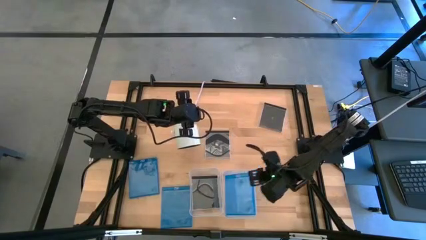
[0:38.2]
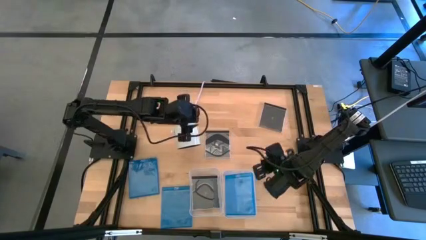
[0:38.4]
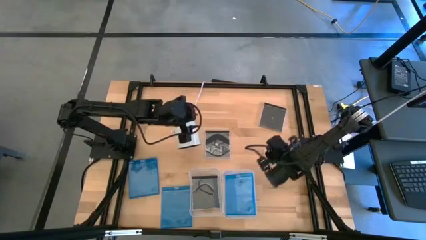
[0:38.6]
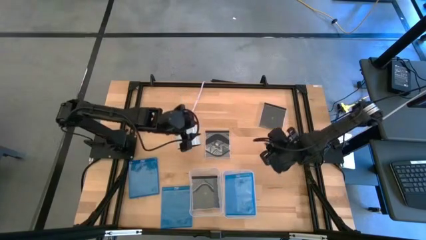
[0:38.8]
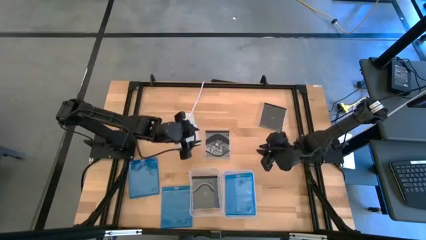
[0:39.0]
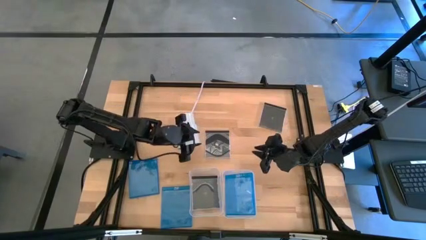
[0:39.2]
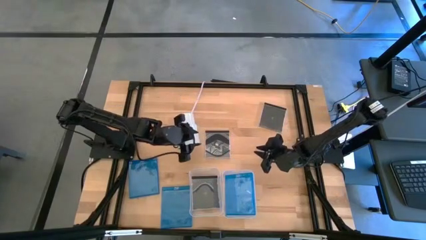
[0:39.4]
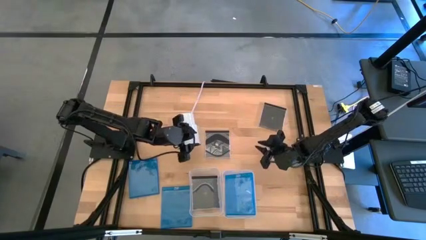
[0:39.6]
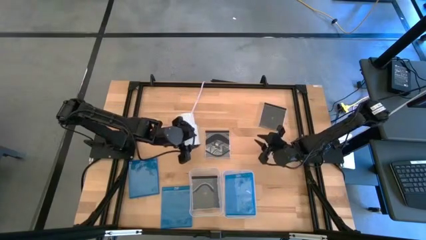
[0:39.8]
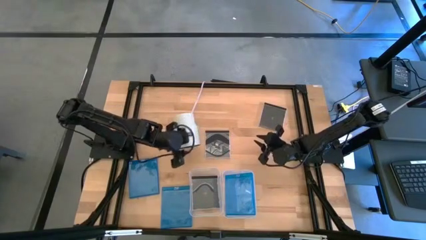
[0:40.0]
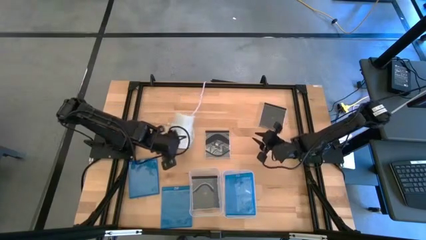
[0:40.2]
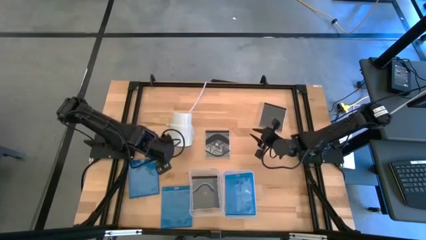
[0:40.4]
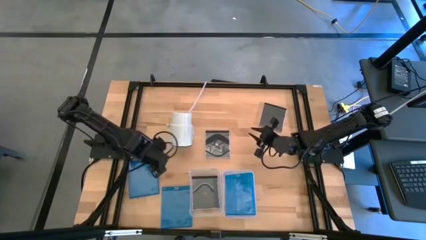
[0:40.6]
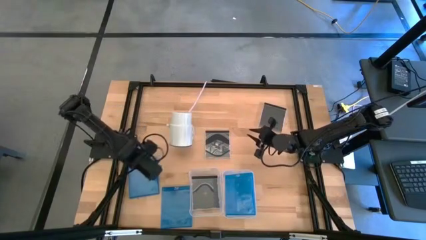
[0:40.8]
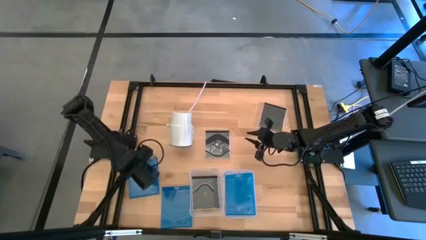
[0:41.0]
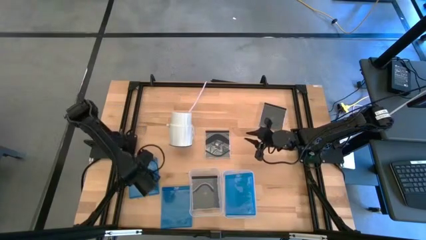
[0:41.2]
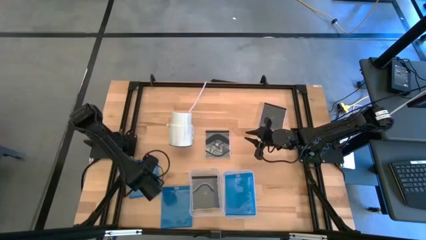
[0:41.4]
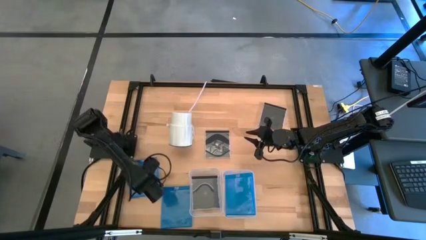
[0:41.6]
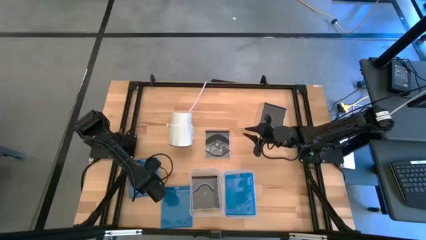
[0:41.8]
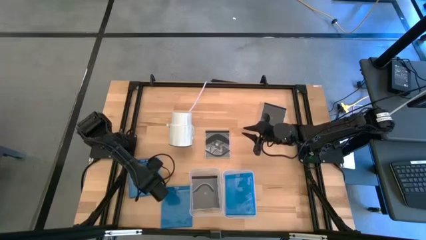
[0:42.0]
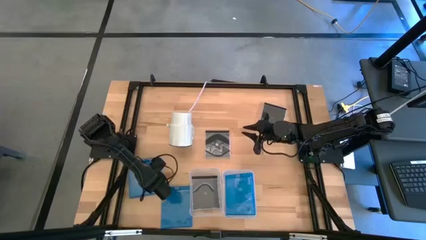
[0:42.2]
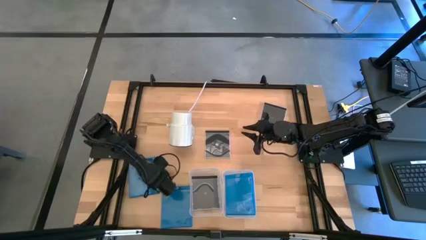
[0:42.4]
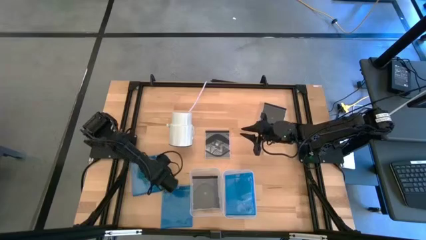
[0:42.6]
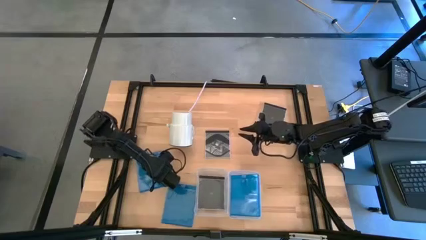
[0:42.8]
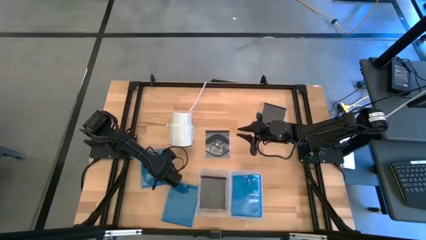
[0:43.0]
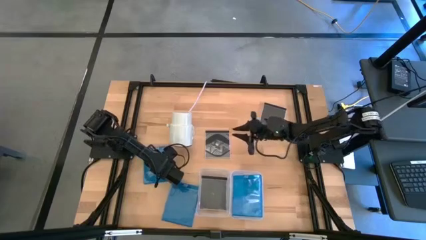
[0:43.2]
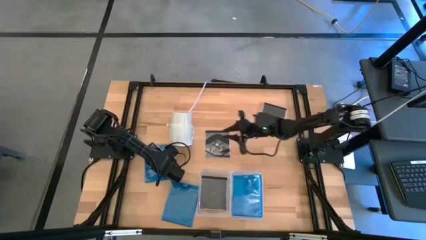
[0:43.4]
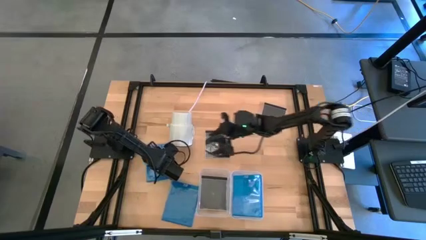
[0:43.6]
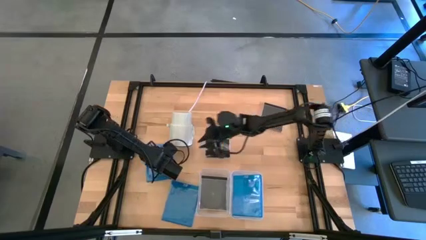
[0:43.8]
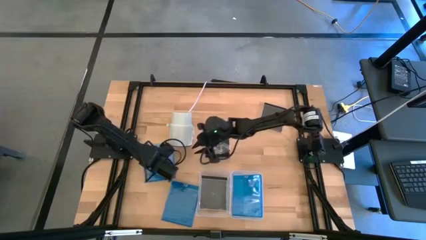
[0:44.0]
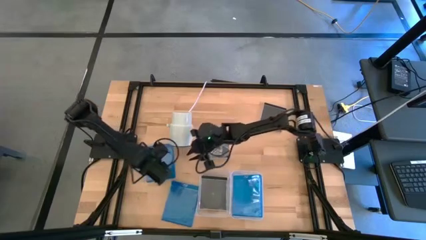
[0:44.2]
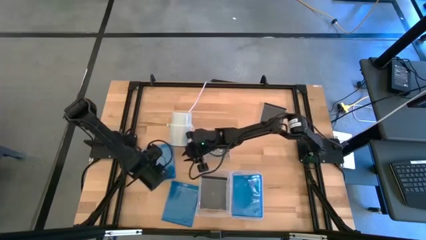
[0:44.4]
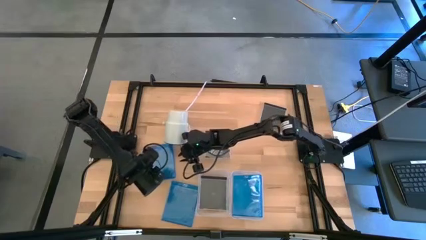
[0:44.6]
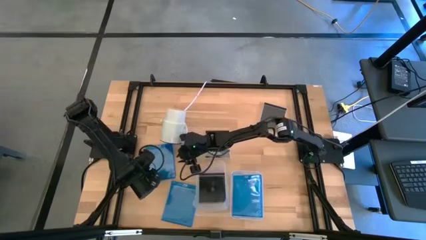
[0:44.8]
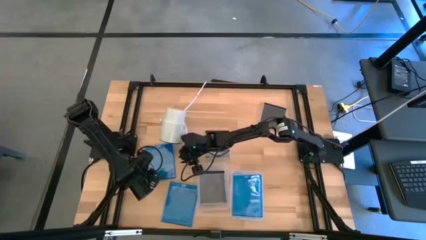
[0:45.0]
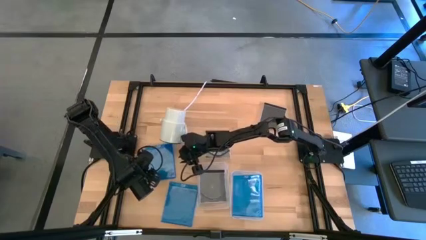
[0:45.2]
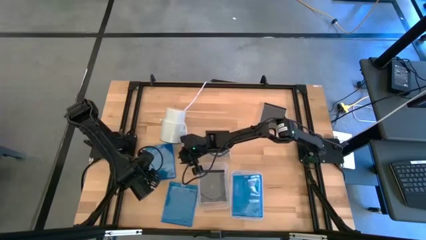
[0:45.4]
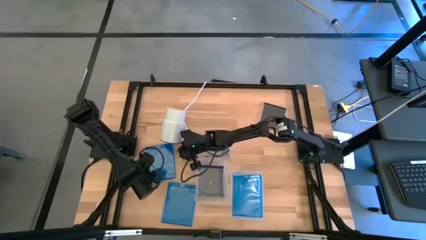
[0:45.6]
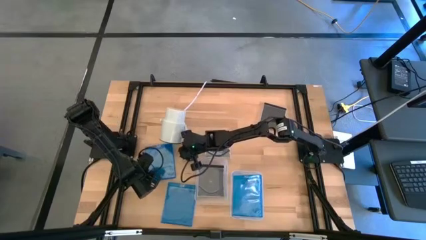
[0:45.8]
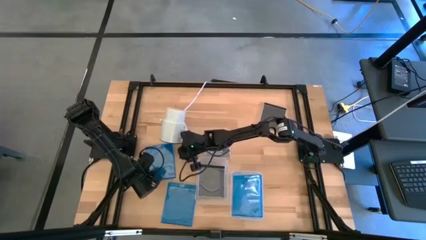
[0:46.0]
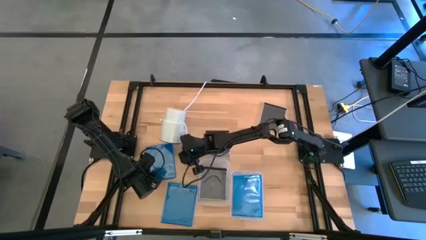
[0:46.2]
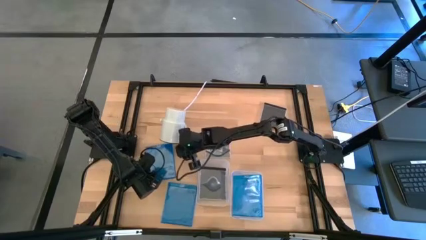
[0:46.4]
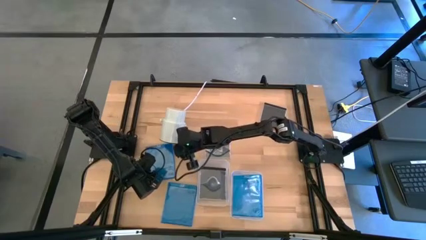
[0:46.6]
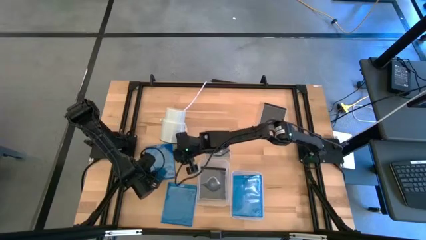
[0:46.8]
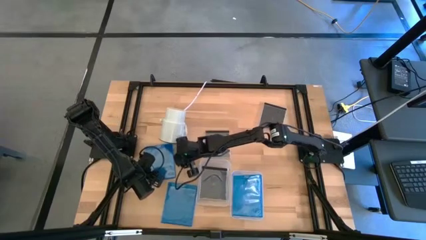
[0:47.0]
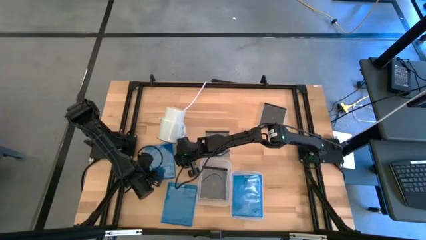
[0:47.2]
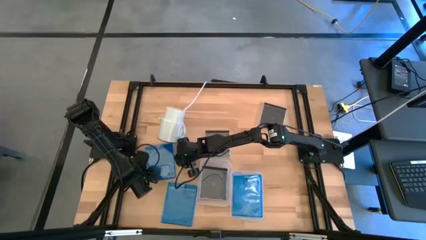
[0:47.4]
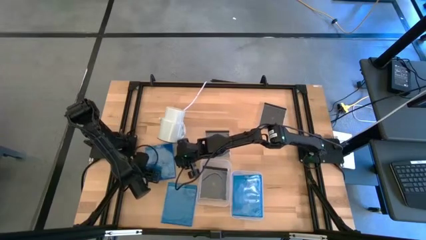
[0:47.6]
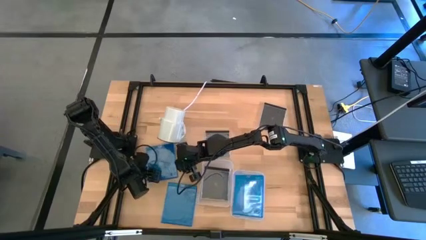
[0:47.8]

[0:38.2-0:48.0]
Task: Pick & place jewel cases by type
Put the top blue cd case into the right transparent bin

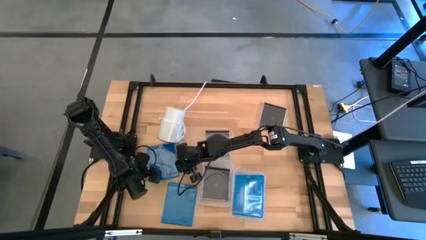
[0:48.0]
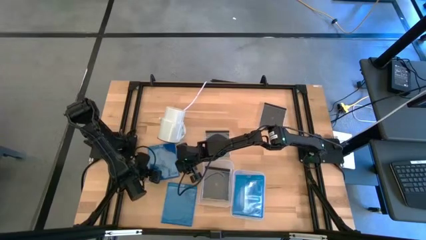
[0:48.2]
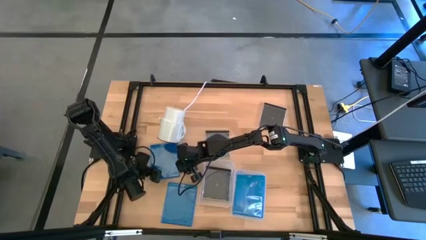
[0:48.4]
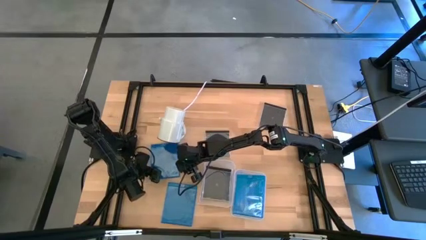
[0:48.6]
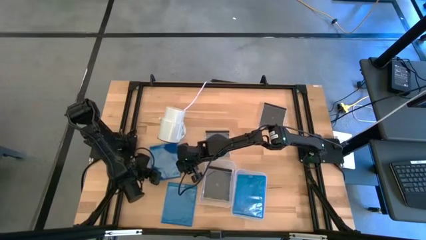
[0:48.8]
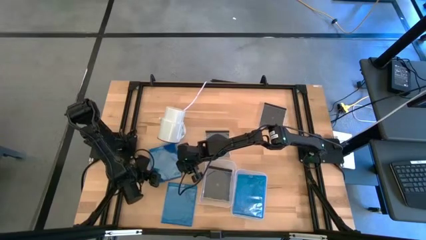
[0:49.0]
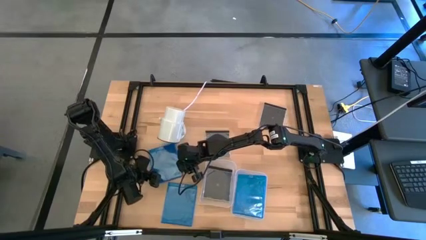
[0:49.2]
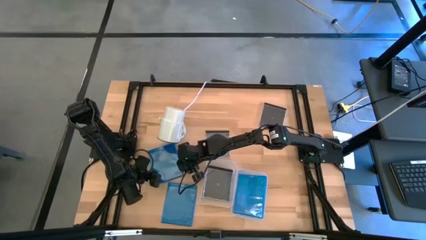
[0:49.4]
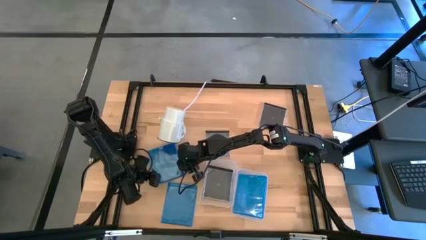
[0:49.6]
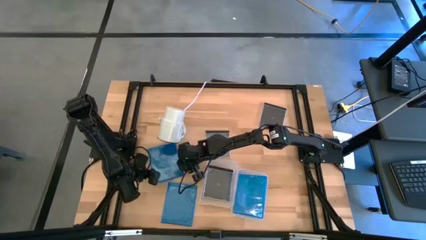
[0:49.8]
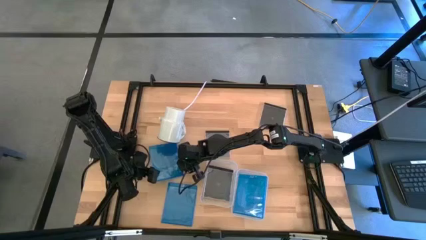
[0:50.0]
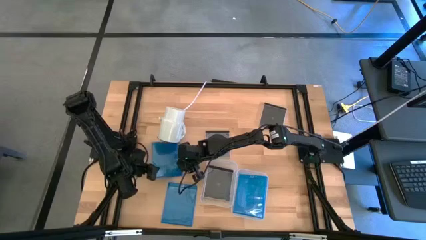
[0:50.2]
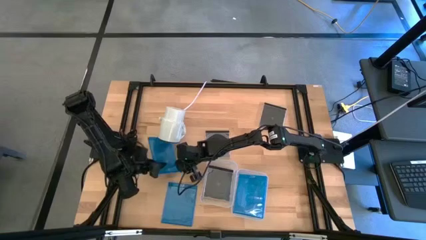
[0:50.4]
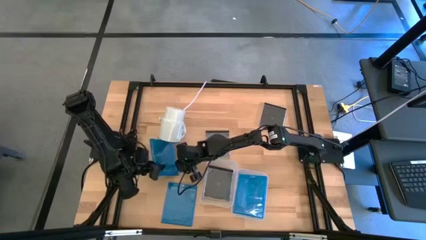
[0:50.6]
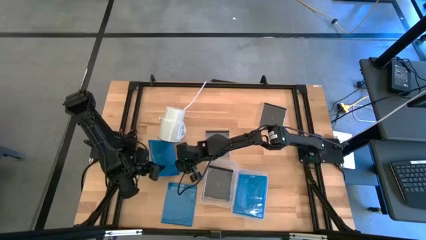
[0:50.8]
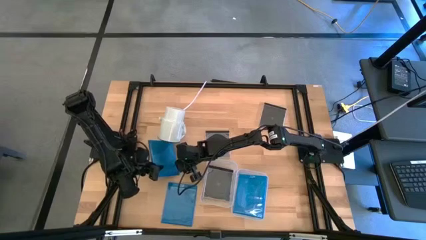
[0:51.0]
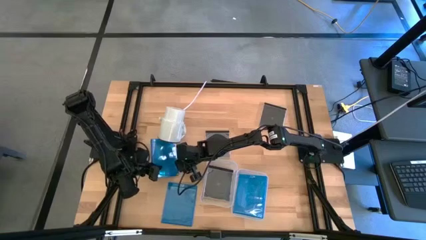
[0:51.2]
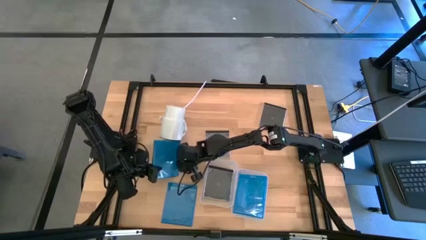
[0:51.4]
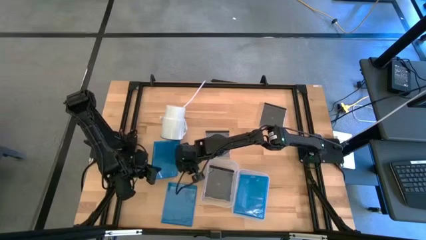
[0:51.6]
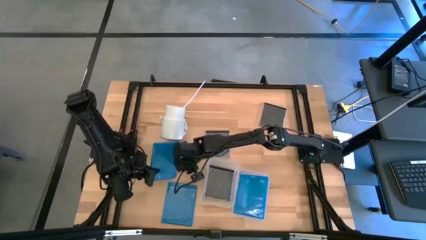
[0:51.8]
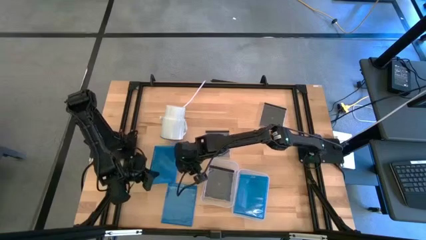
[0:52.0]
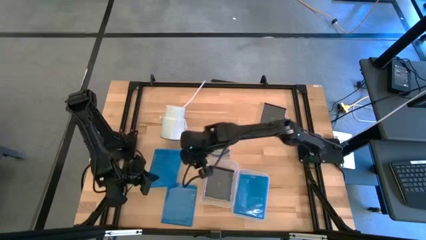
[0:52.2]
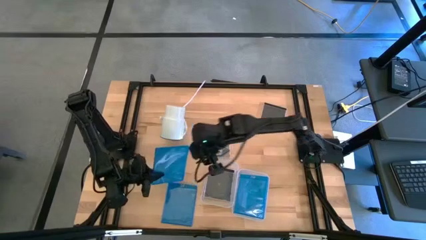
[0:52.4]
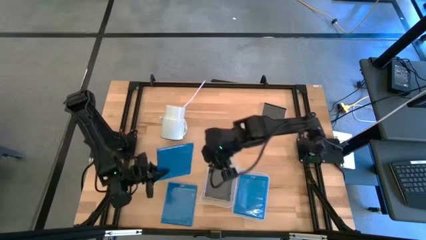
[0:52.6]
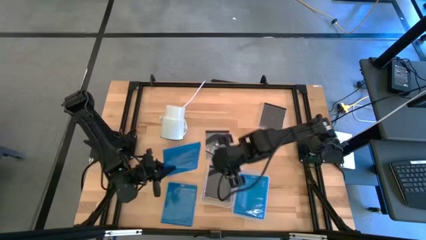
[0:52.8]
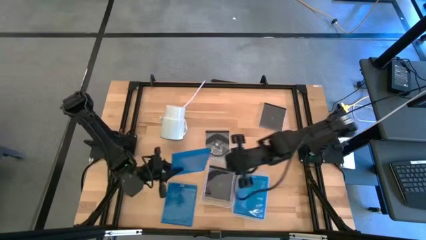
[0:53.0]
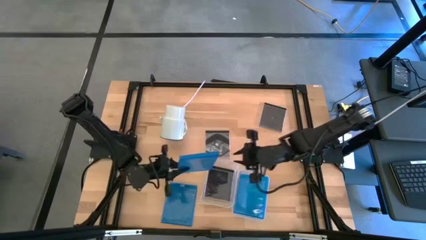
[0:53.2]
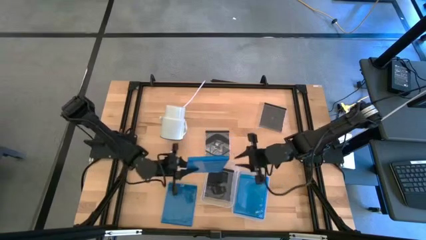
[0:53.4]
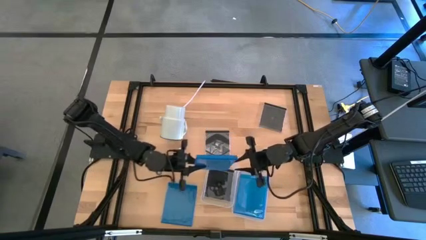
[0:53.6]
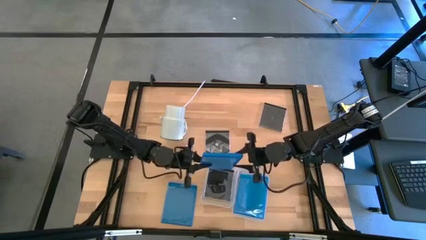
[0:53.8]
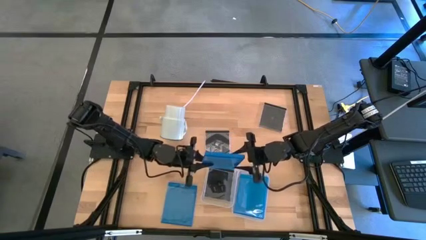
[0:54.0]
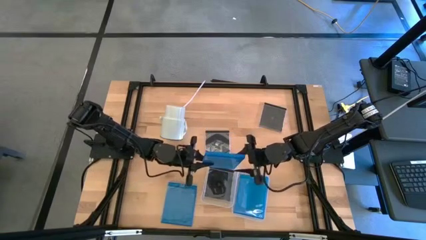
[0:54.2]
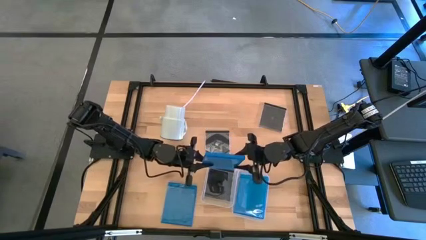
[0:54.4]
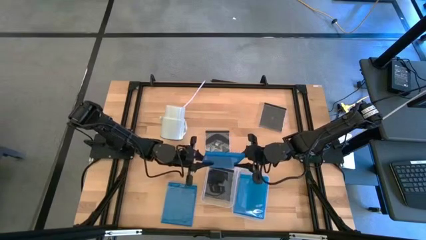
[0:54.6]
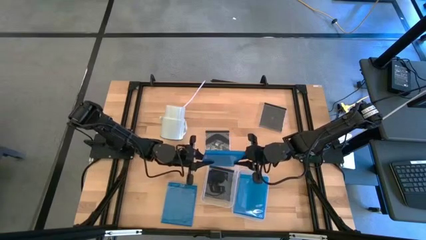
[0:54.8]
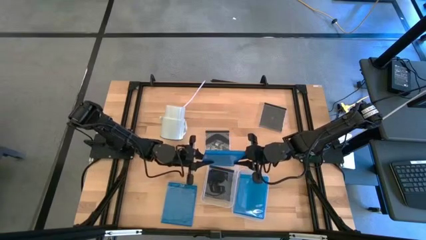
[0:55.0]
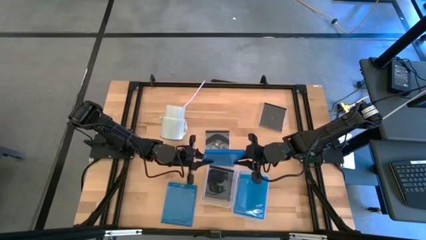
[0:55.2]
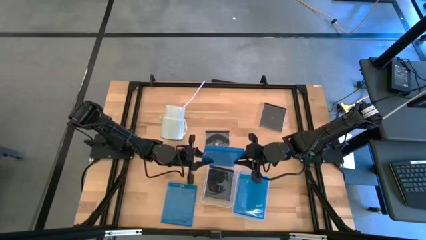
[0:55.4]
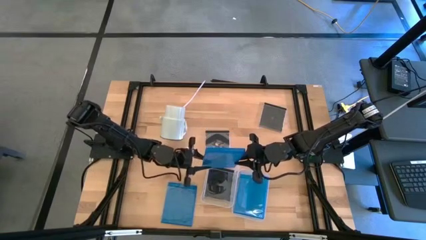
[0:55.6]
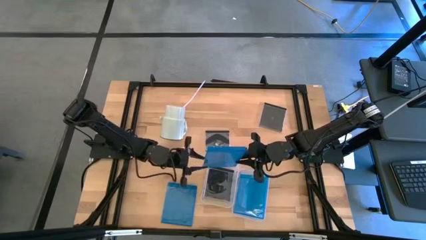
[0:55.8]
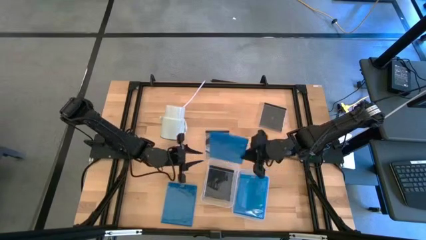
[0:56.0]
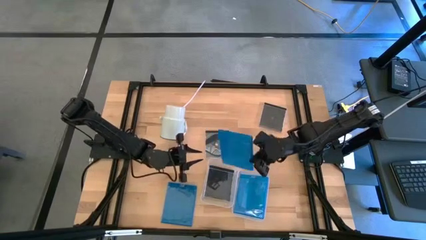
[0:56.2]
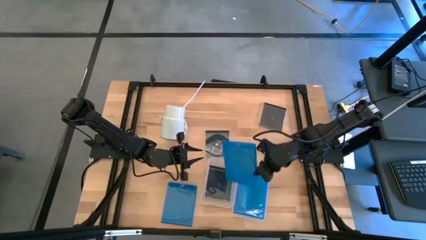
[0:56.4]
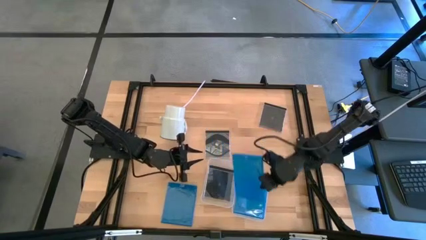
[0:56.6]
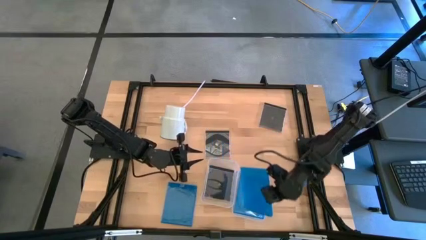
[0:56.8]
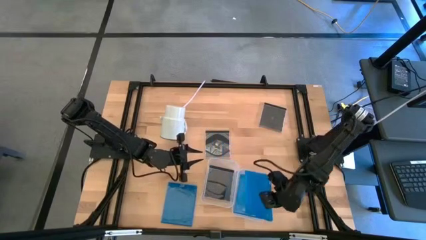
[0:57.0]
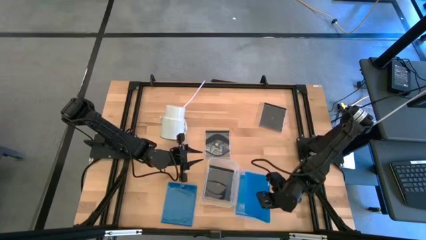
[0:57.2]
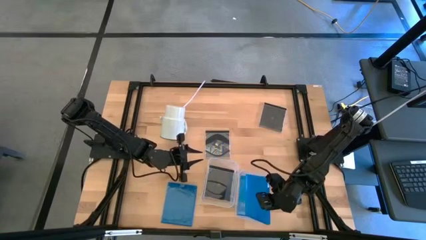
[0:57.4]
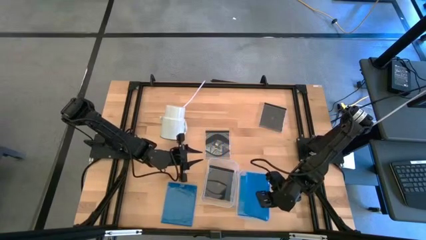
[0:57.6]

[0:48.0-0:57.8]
Put the top blue cd case into the right transparent bin
